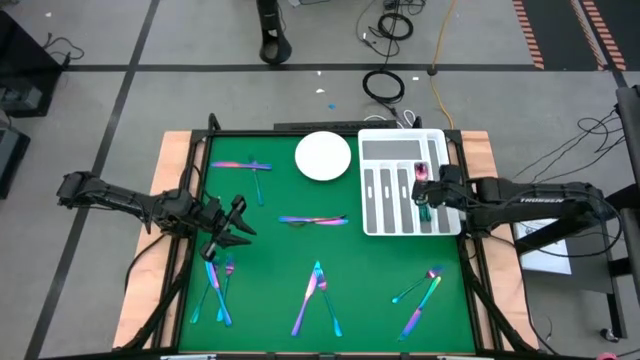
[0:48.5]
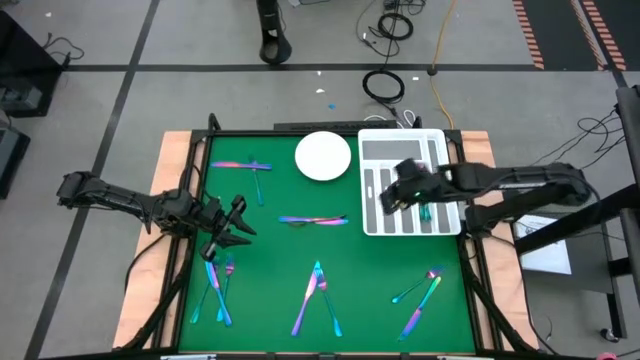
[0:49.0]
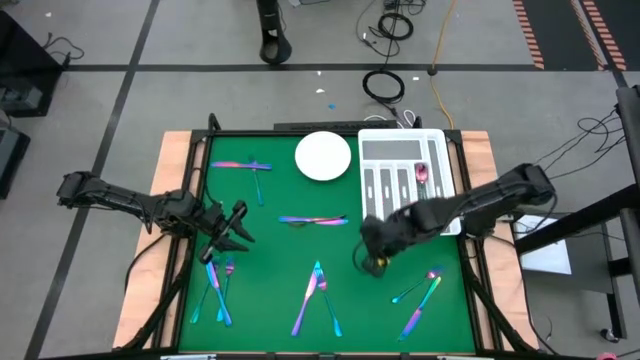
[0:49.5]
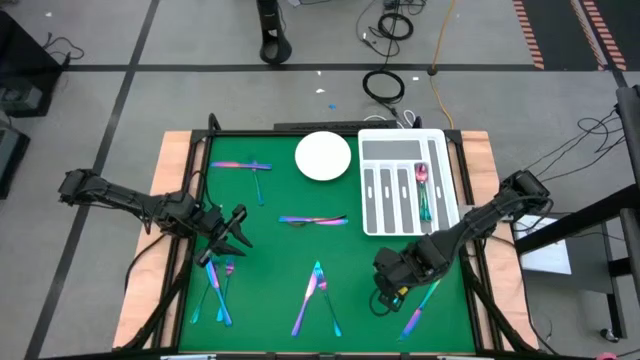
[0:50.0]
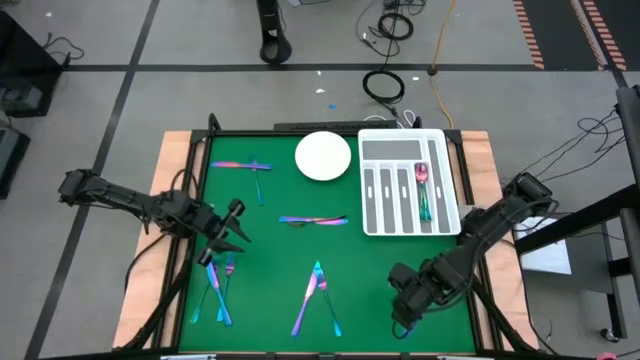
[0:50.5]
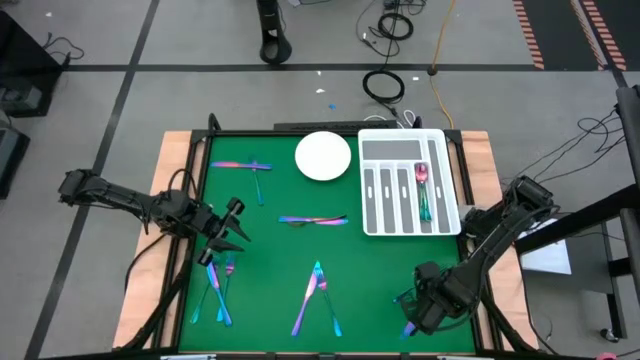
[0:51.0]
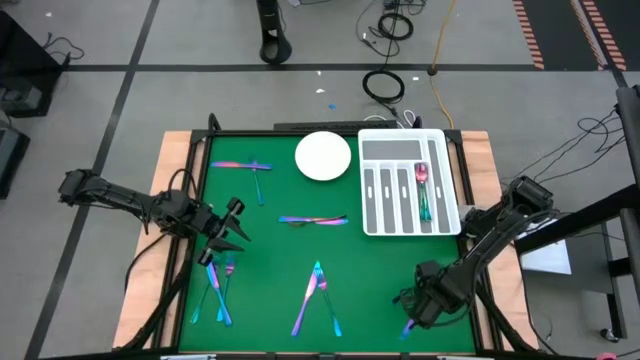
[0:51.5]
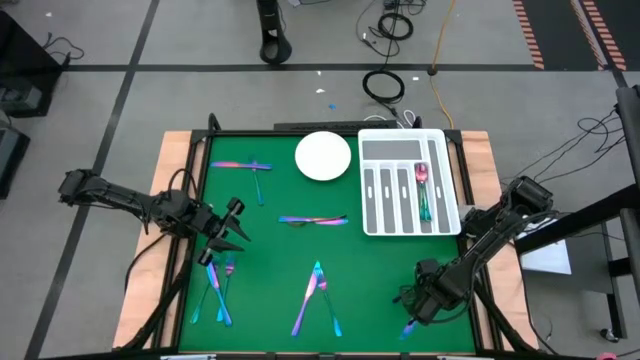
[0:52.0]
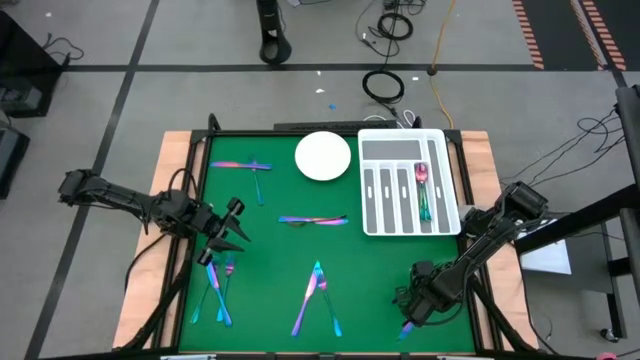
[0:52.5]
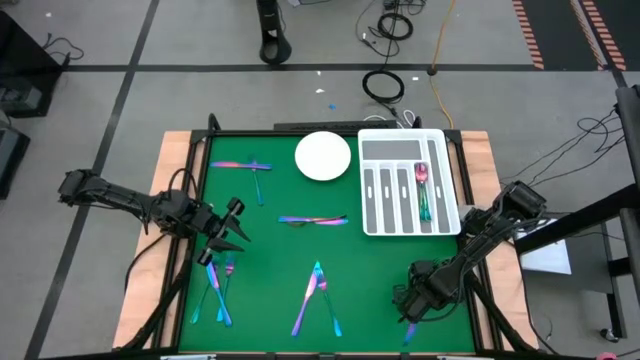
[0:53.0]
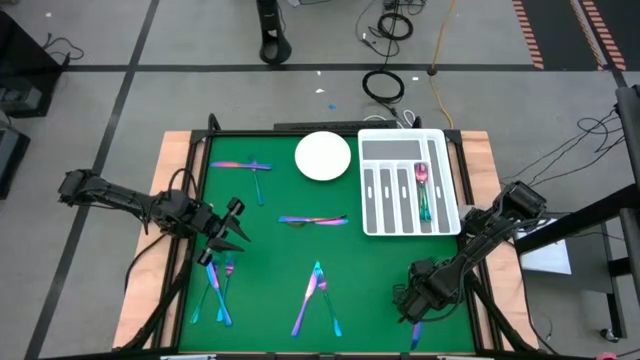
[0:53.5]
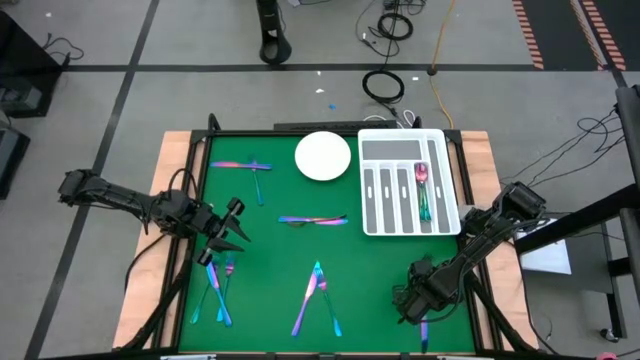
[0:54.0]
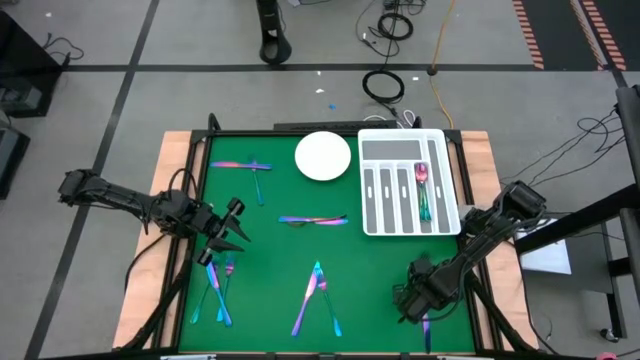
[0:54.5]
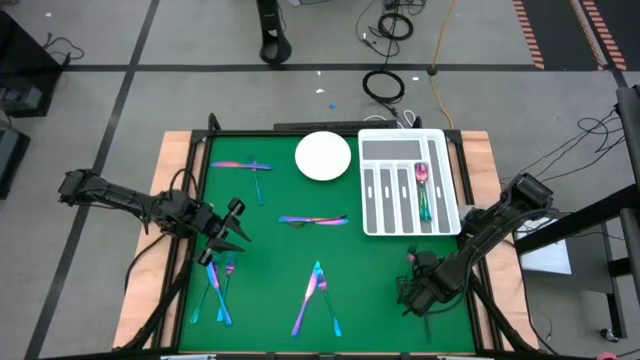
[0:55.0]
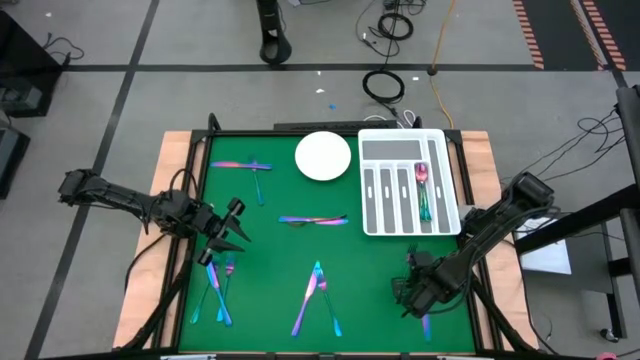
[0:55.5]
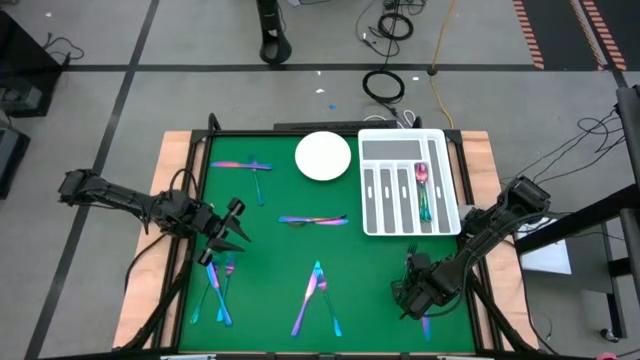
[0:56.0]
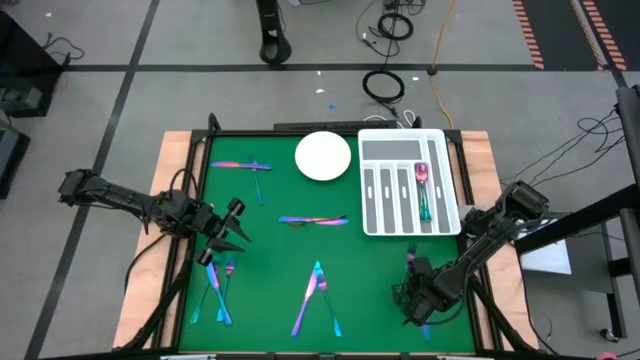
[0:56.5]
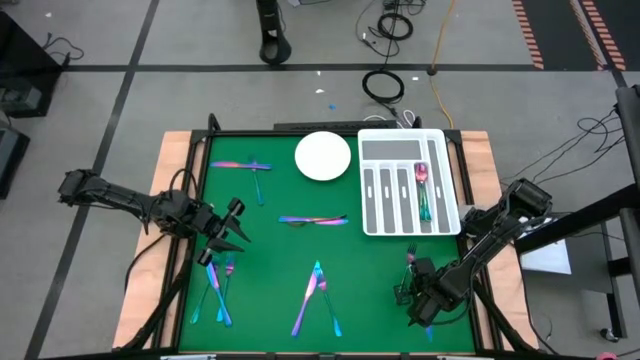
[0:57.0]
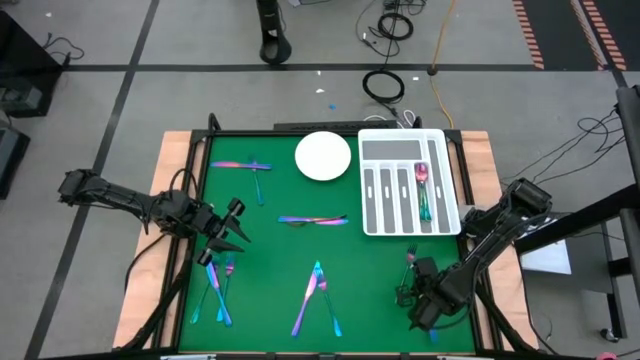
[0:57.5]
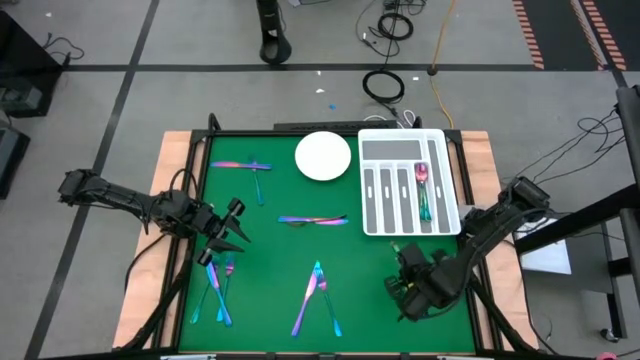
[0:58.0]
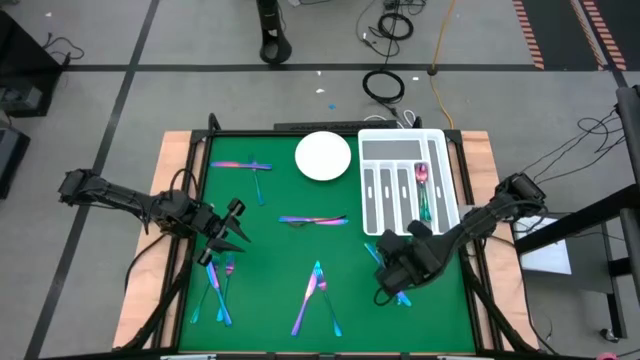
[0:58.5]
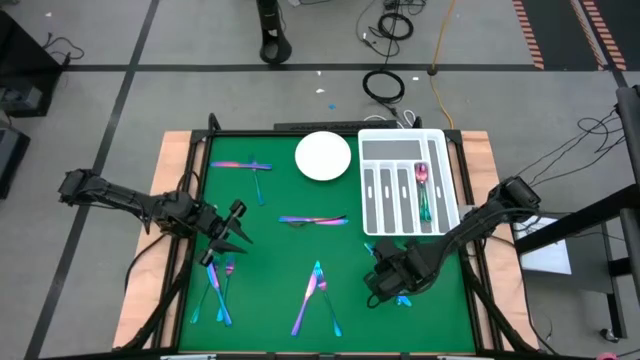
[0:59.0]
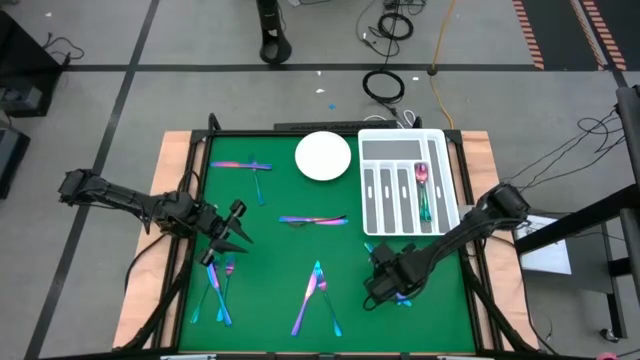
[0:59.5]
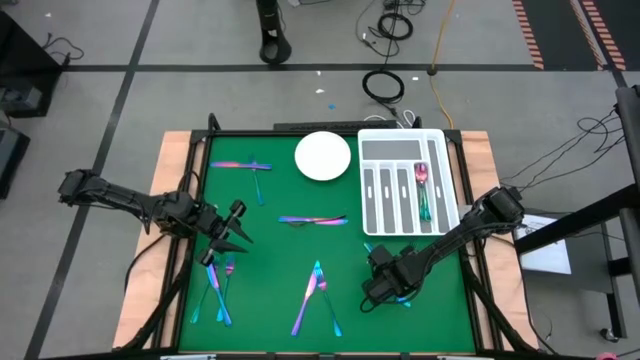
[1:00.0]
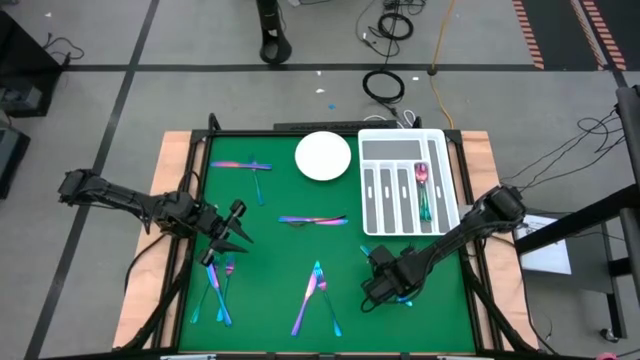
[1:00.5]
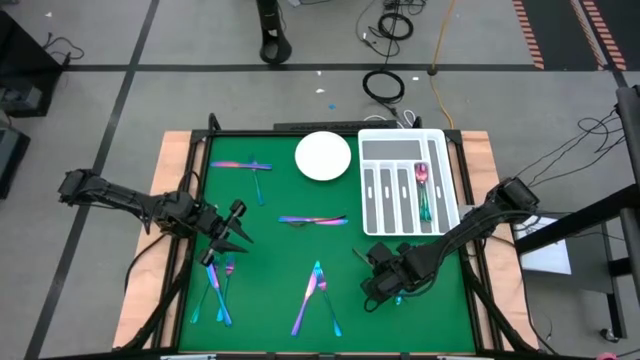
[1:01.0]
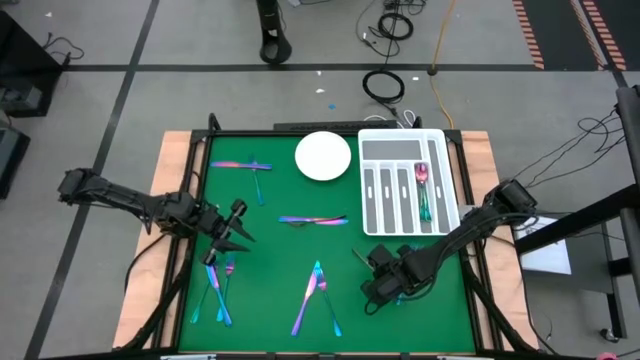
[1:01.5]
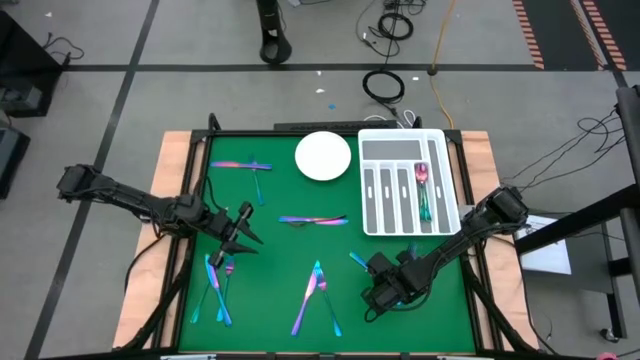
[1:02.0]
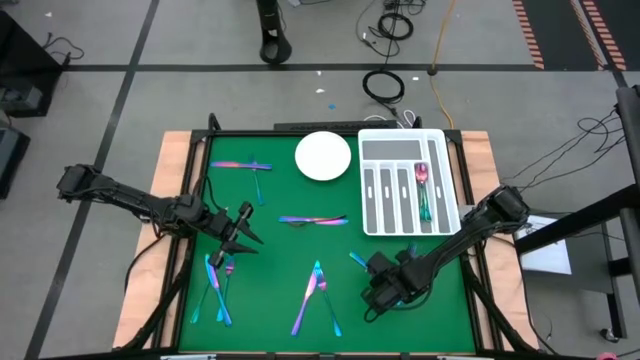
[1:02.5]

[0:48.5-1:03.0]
Task: Sort silverware
Put the iridescent knife into the white silverware tray

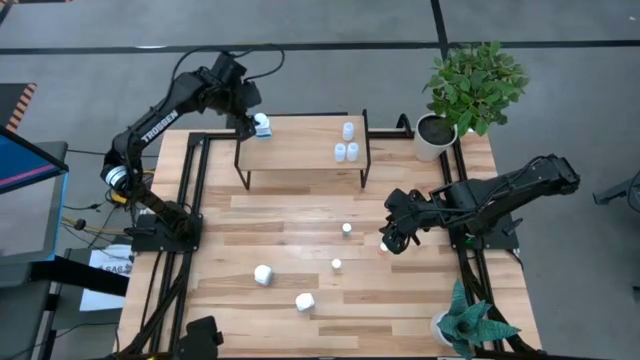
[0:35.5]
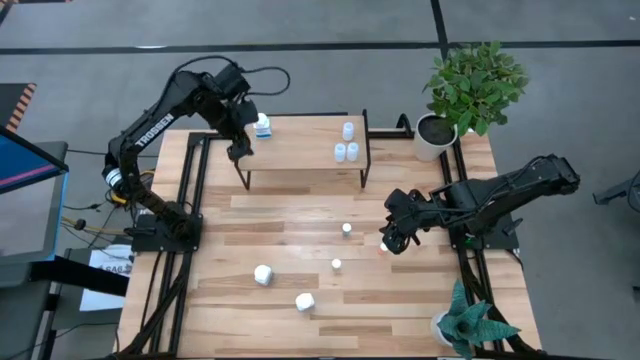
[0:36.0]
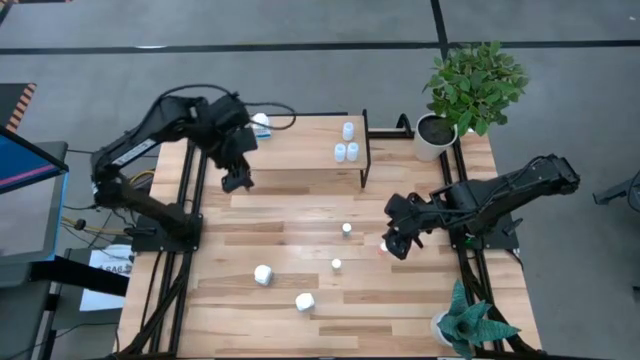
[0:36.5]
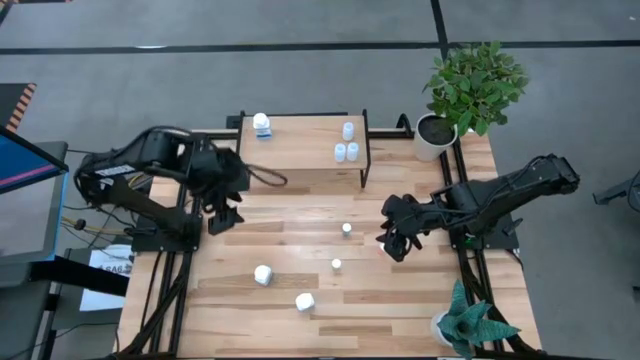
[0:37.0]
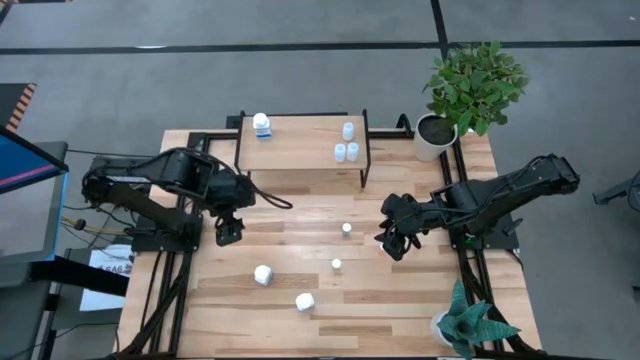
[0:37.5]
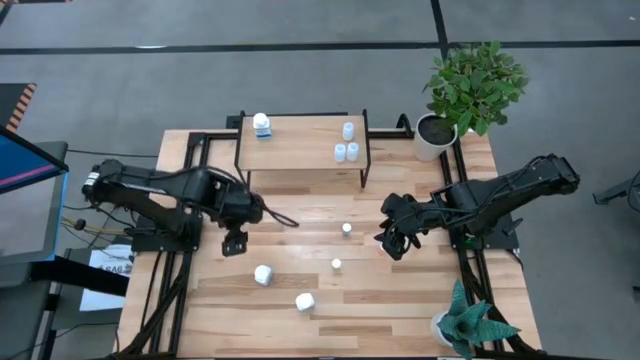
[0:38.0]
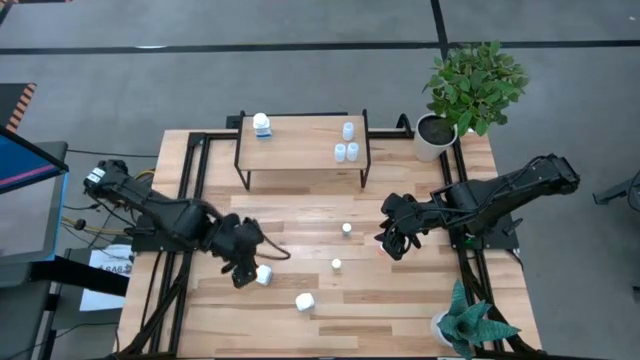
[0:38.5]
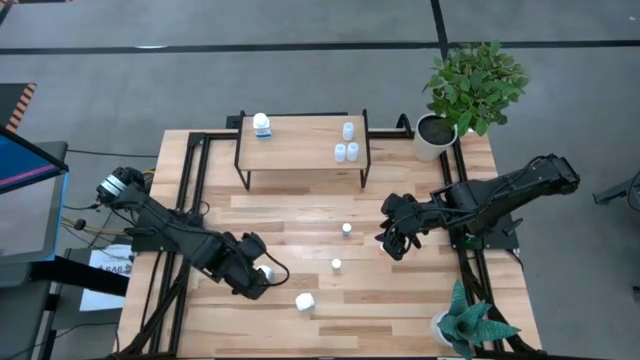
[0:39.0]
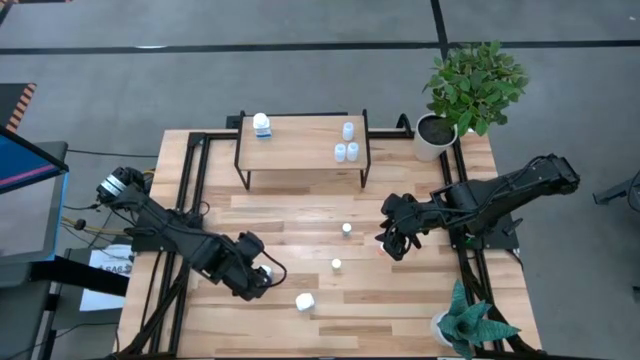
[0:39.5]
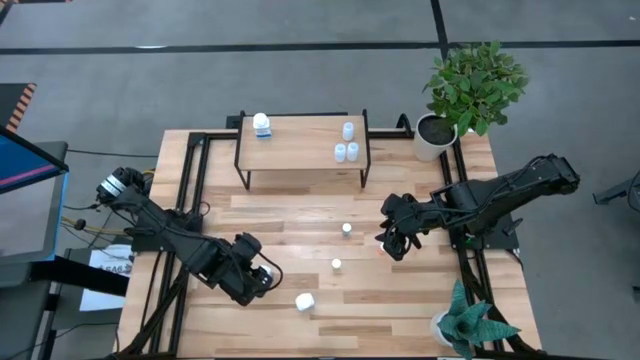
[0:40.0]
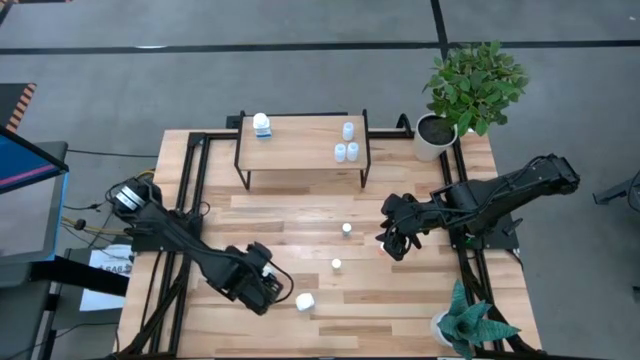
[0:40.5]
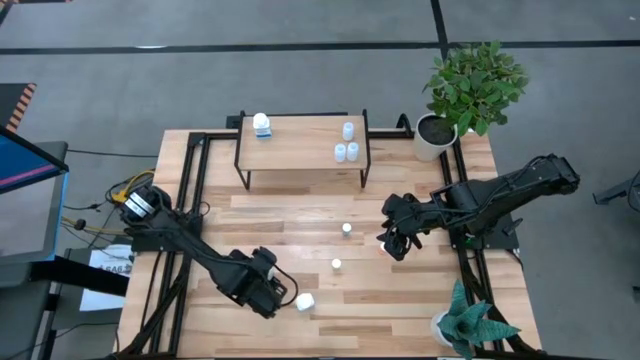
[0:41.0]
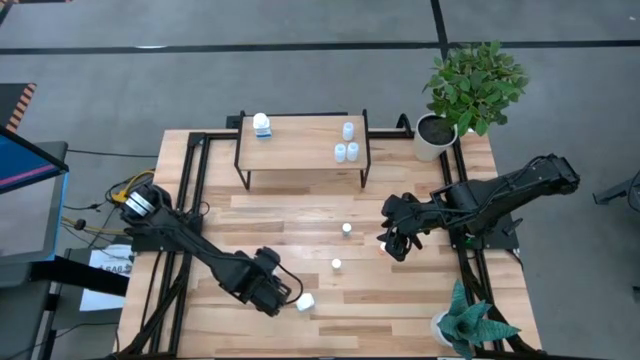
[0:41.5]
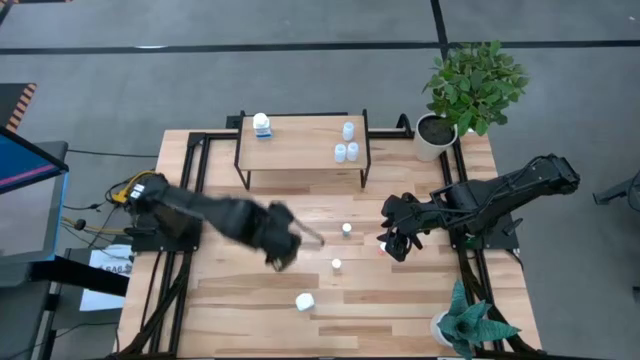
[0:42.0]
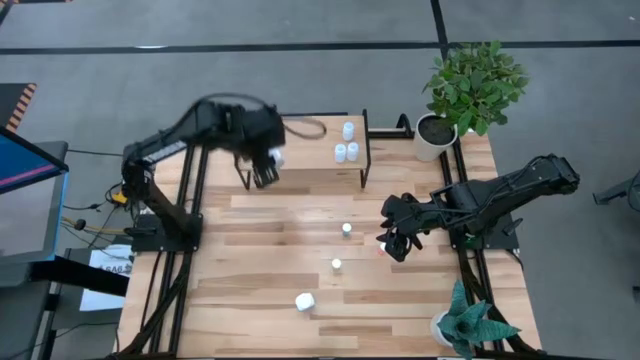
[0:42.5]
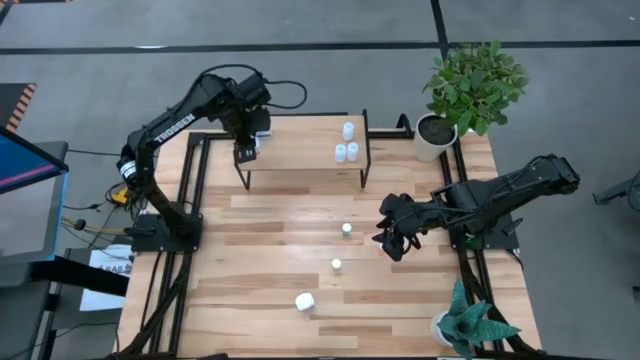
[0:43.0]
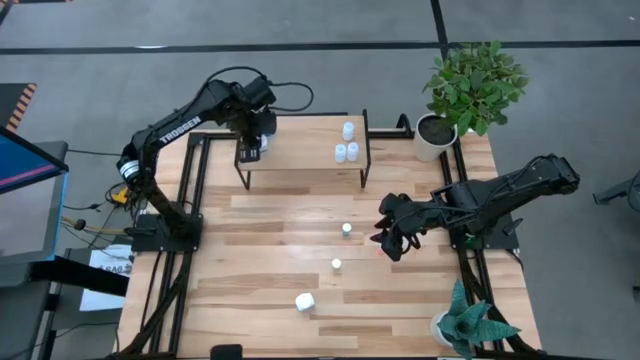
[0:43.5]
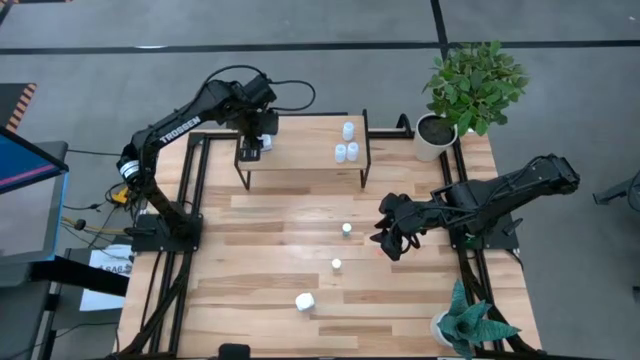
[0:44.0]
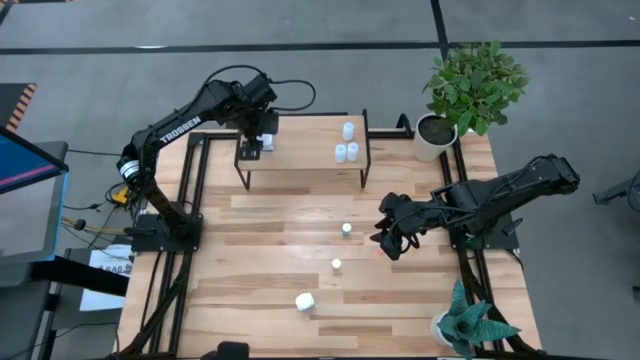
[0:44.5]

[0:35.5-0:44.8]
Task: Pick and place medicine bottles onto shelf by color
Put the left white medicine bottle on the shelf aligned with the other white medicine bottle
